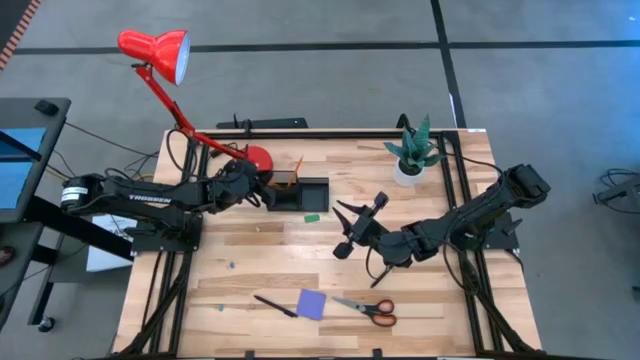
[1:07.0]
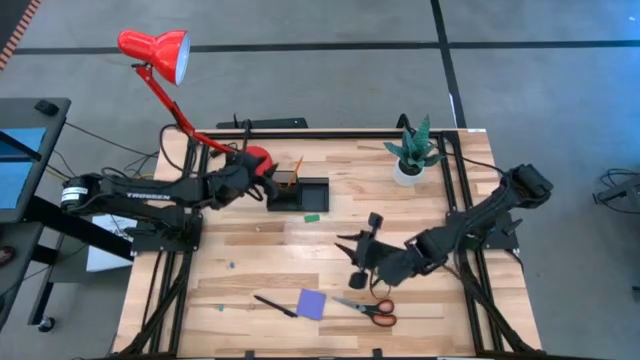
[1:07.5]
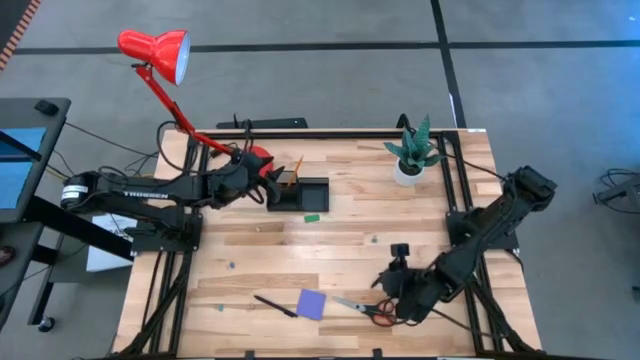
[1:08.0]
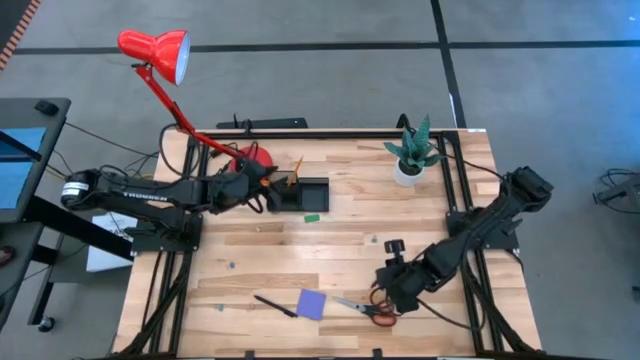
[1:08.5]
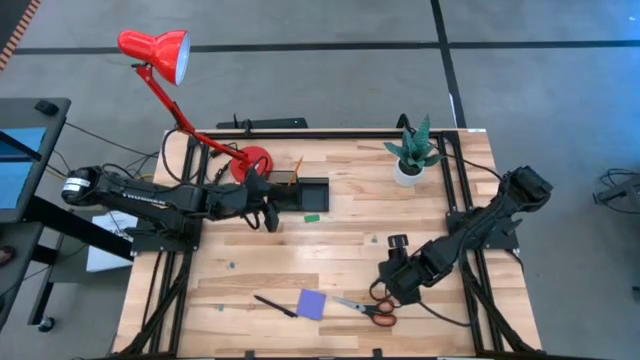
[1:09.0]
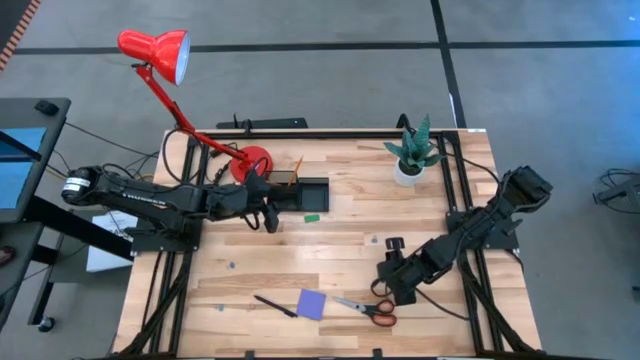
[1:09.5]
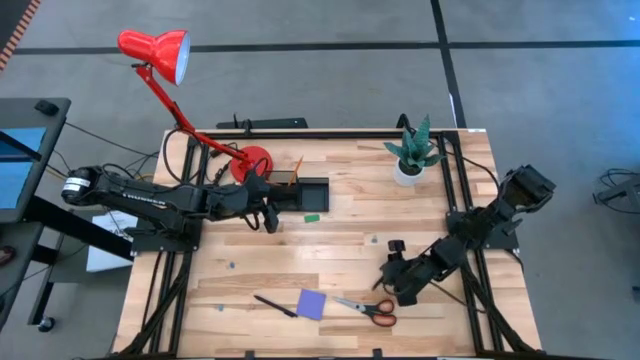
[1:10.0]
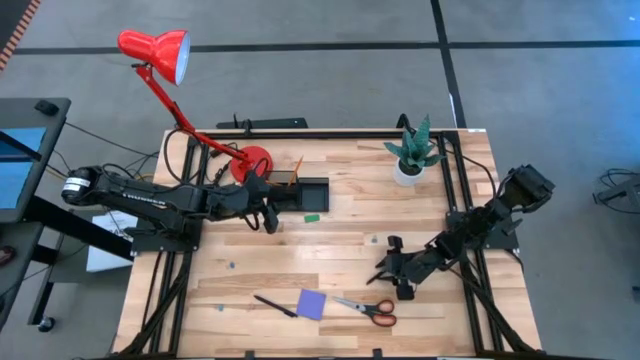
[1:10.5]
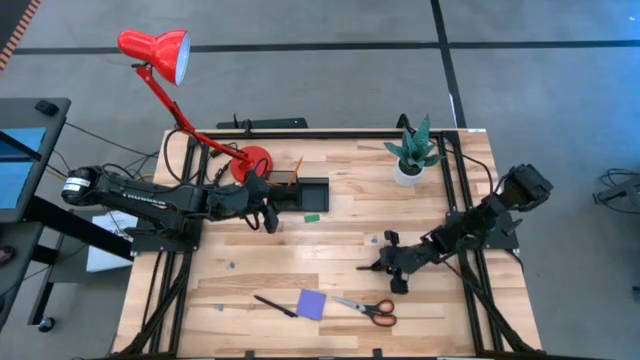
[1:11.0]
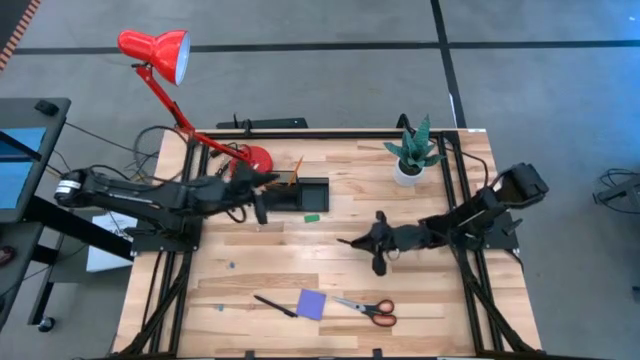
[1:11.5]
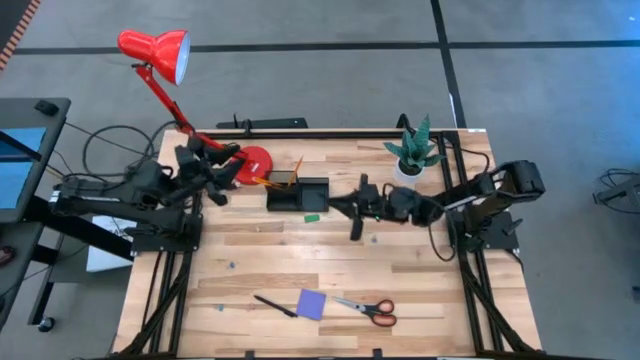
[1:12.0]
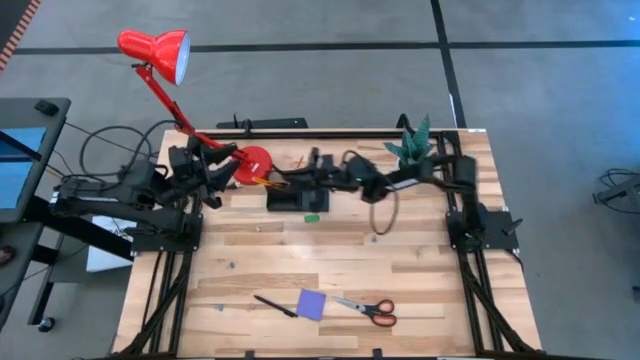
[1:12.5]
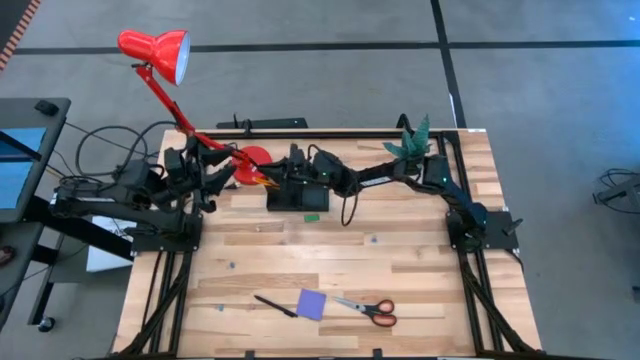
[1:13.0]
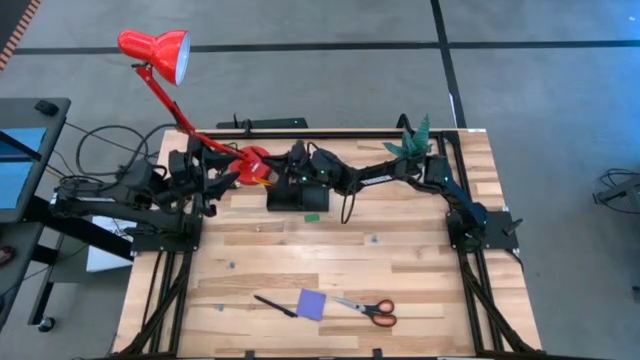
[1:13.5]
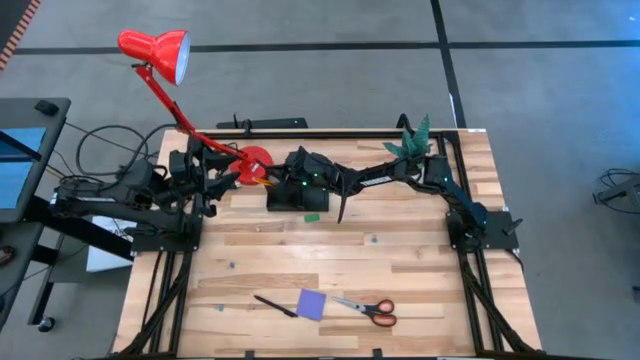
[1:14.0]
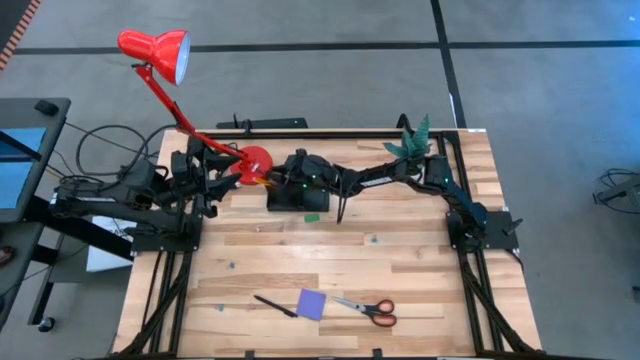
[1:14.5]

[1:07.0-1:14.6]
Task: Pick and place office supplies into organizer
Put the right black pen into the black desk organizer

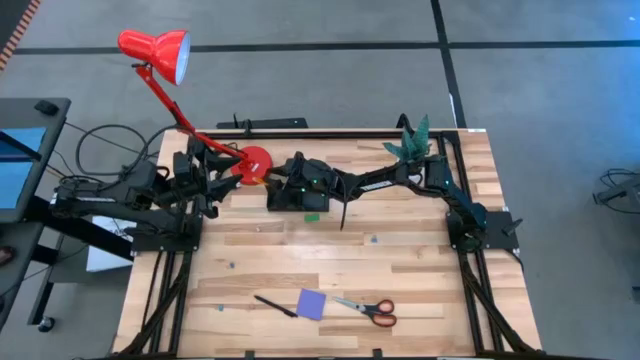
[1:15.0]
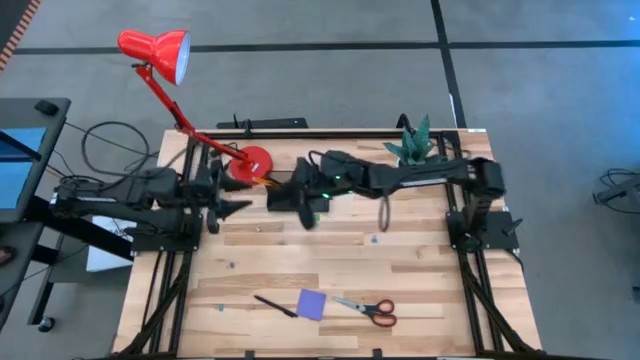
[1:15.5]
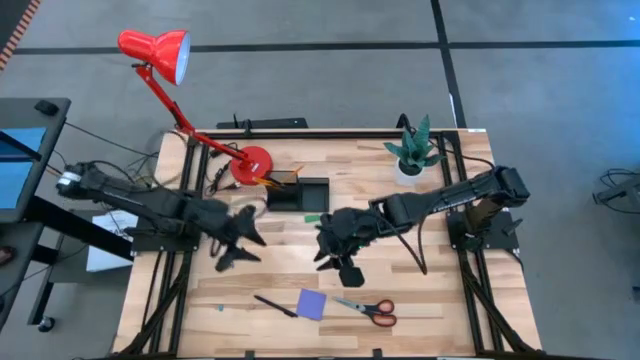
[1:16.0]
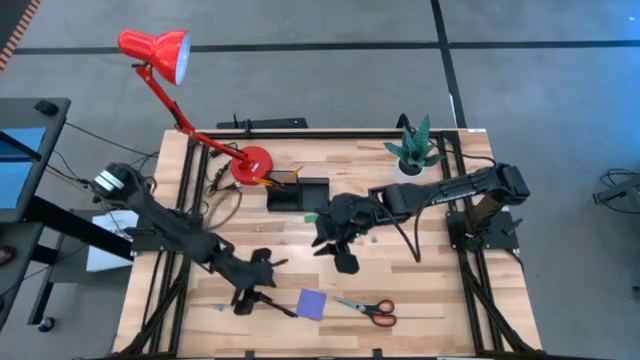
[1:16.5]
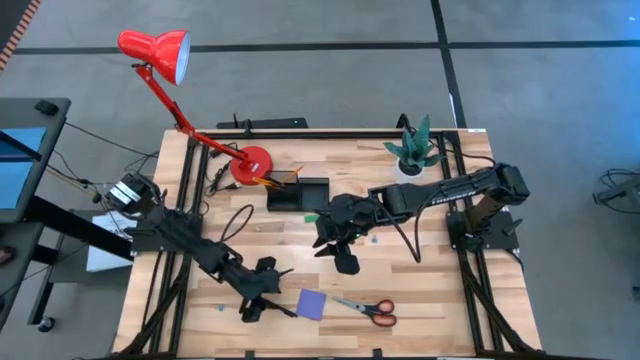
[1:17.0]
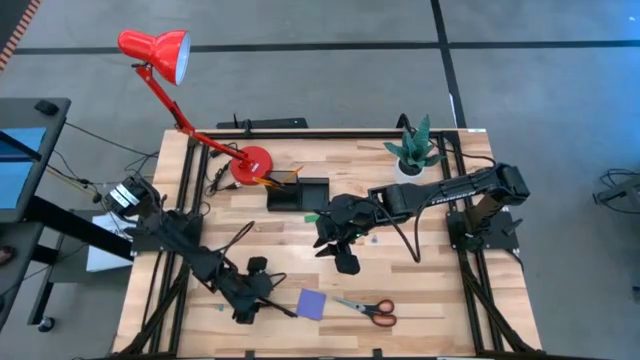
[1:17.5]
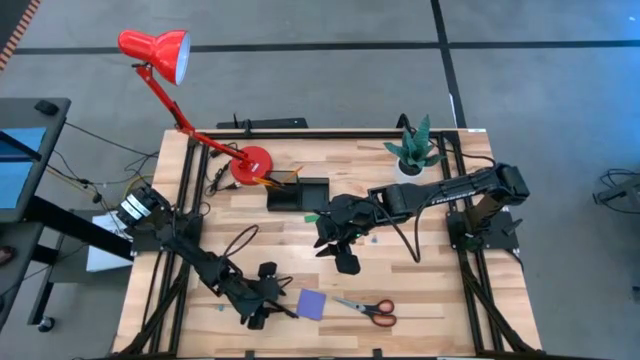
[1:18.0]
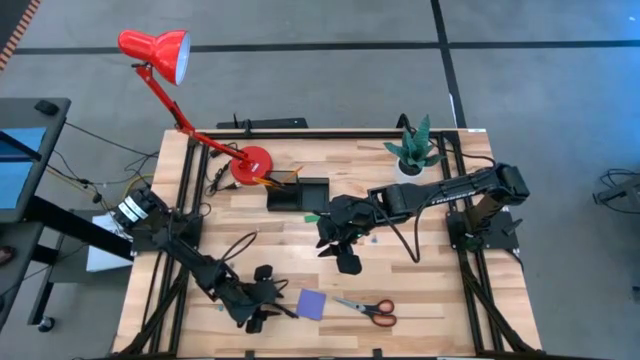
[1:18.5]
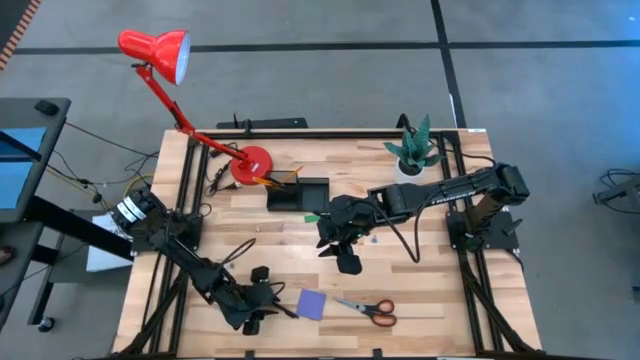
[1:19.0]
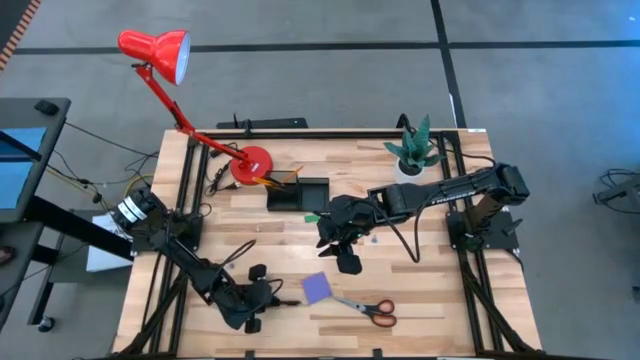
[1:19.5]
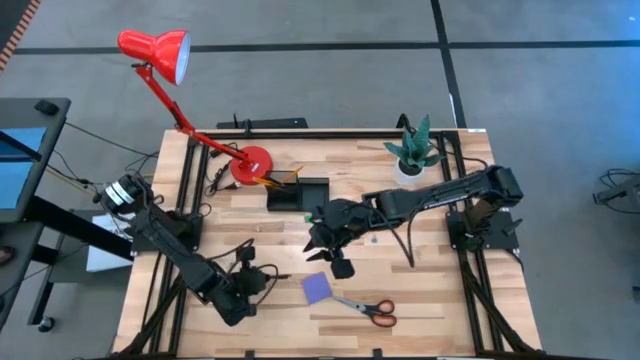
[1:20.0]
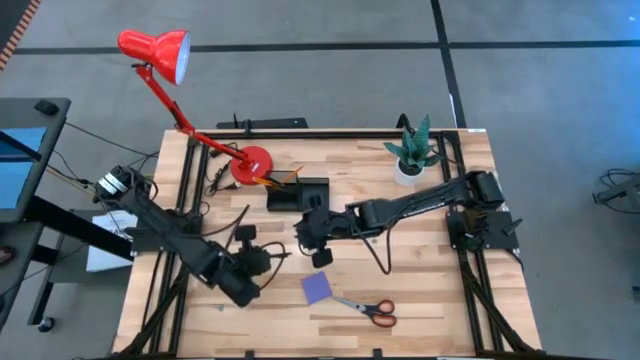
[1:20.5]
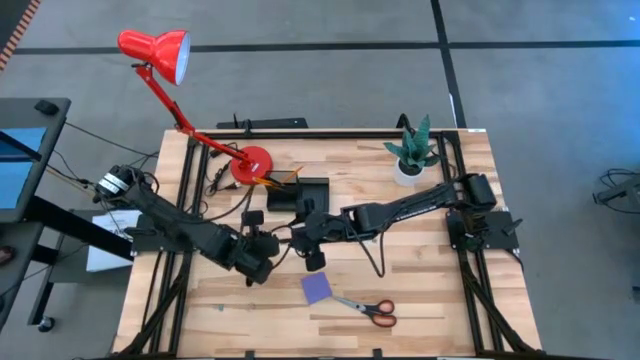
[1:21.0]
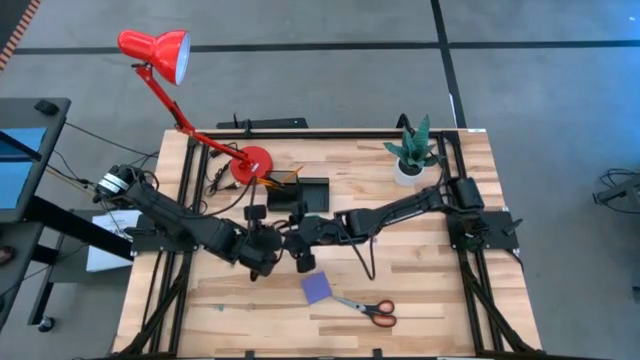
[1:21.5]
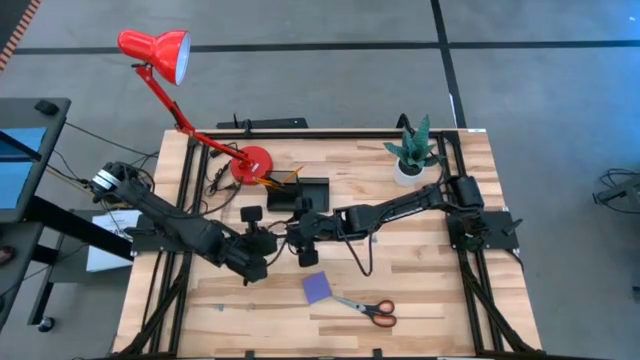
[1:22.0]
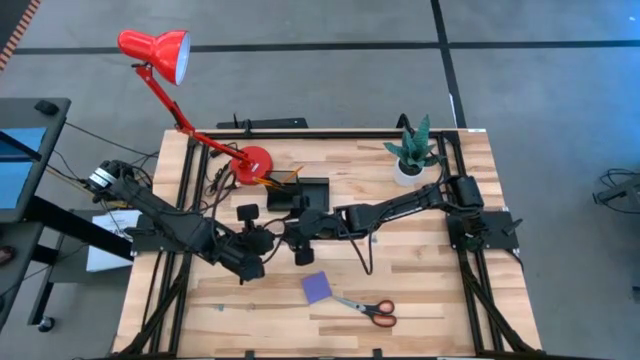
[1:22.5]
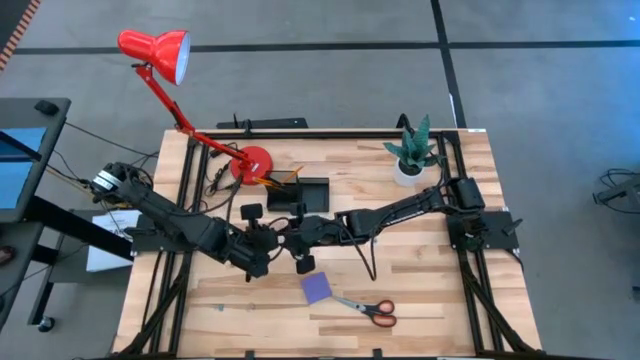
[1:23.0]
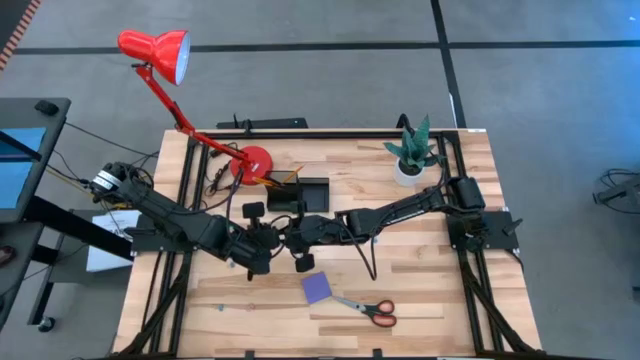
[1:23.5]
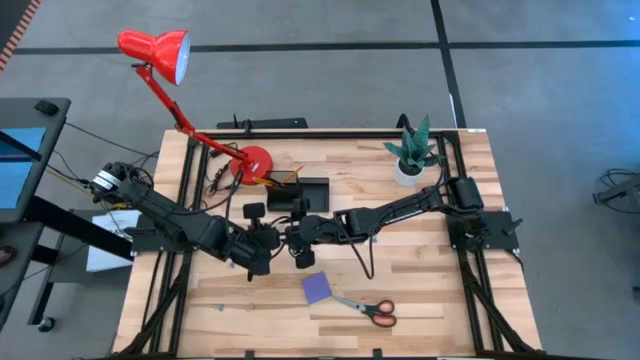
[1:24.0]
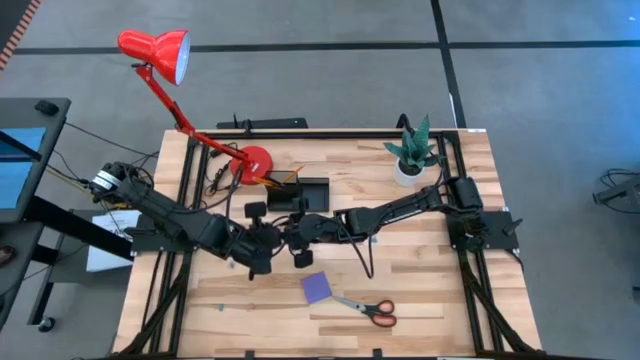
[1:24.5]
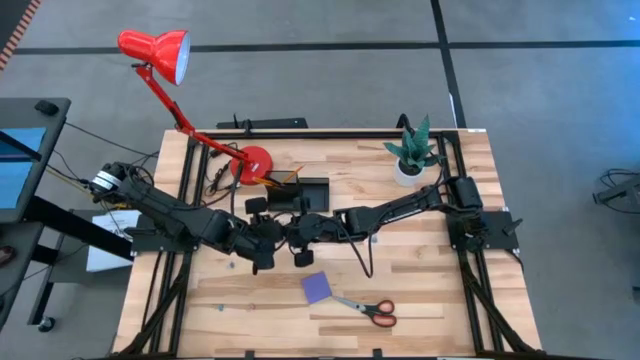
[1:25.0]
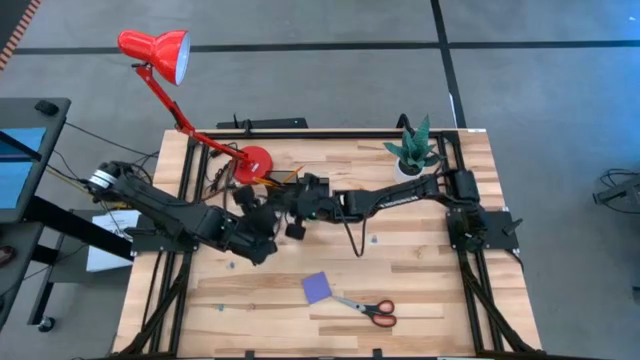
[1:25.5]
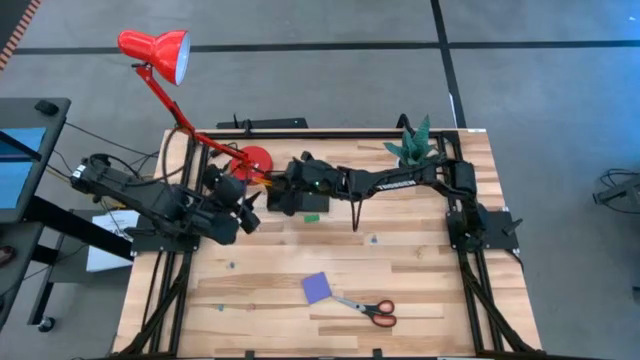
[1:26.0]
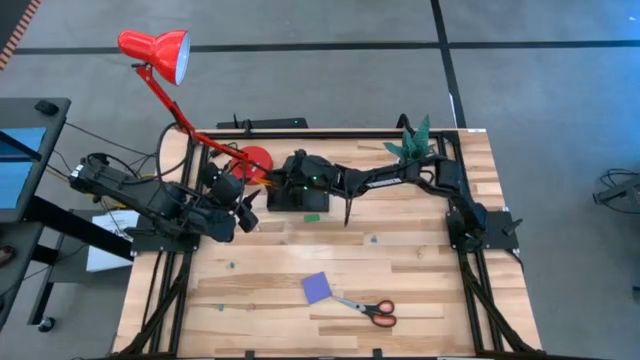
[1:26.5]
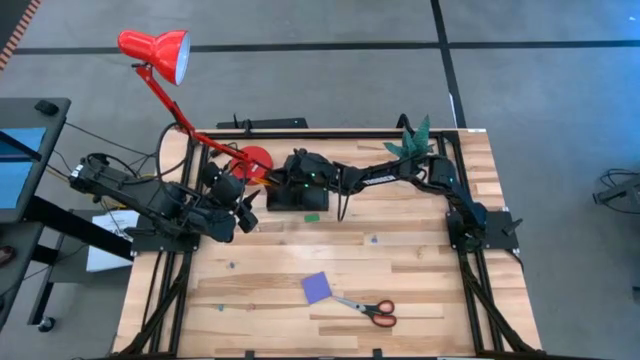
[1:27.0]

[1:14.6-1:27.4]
Put the black pen into the black desk organizer
